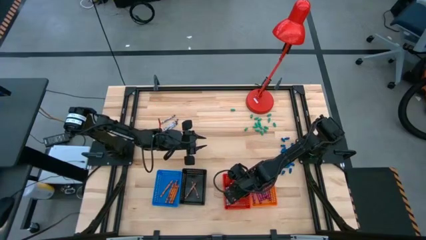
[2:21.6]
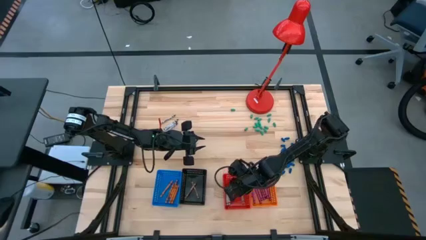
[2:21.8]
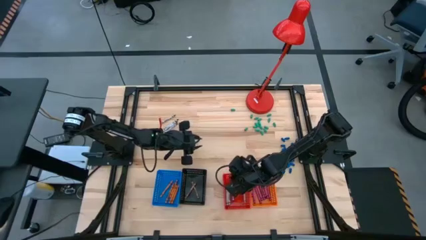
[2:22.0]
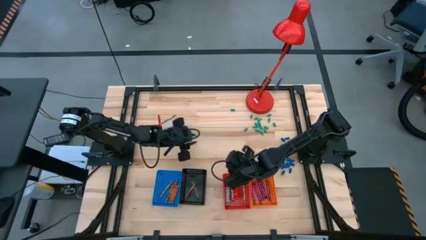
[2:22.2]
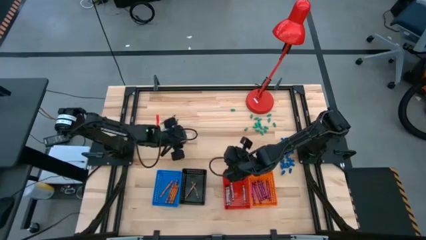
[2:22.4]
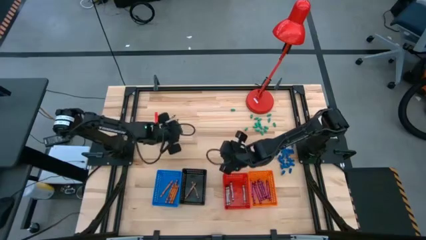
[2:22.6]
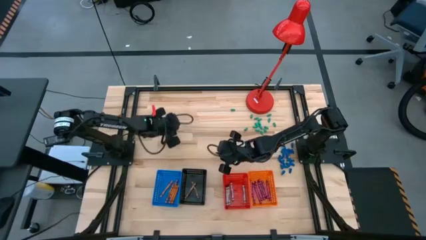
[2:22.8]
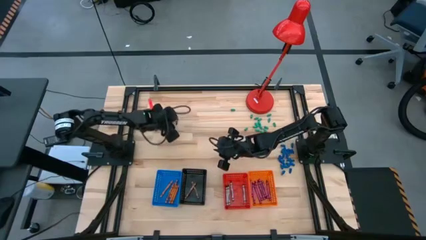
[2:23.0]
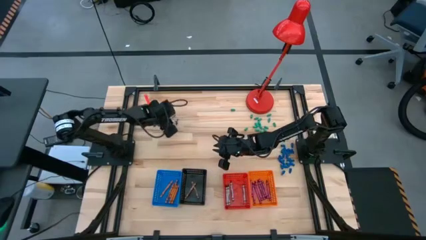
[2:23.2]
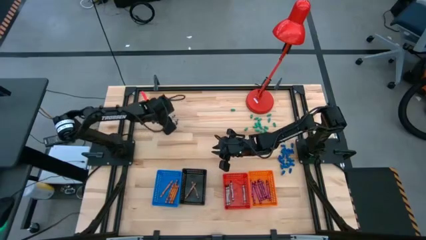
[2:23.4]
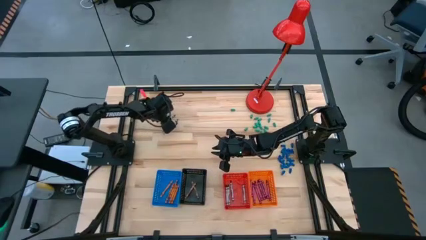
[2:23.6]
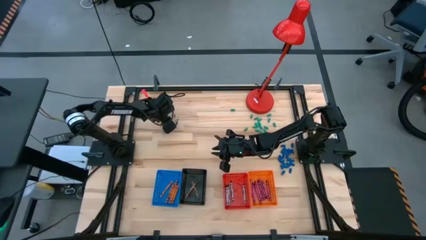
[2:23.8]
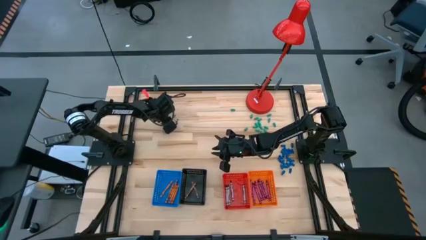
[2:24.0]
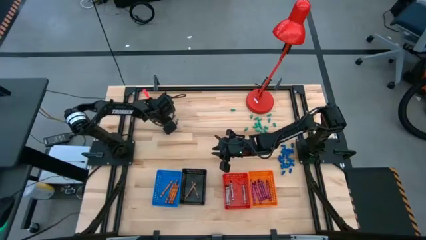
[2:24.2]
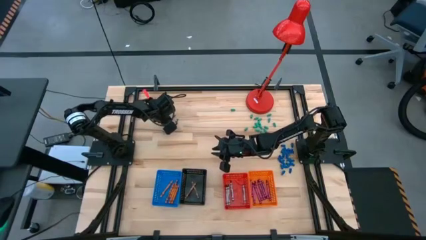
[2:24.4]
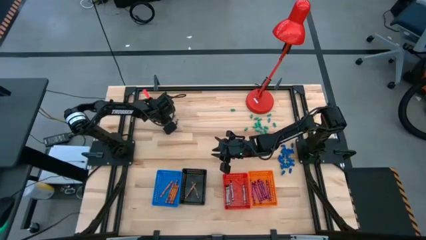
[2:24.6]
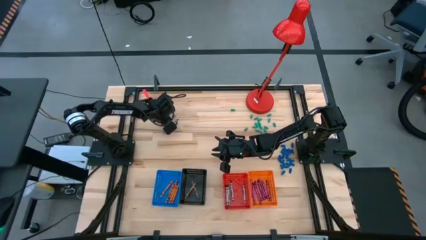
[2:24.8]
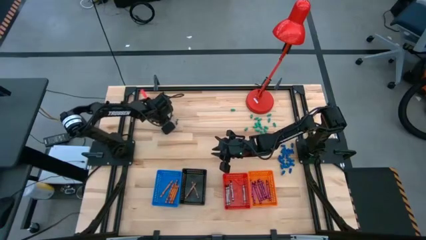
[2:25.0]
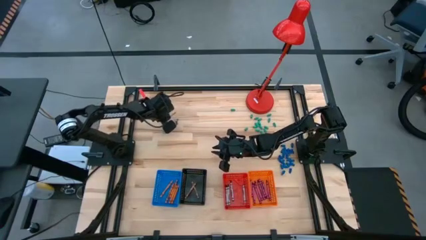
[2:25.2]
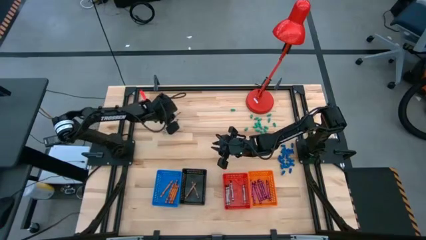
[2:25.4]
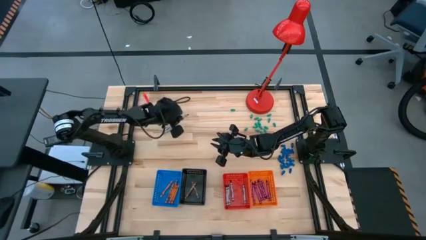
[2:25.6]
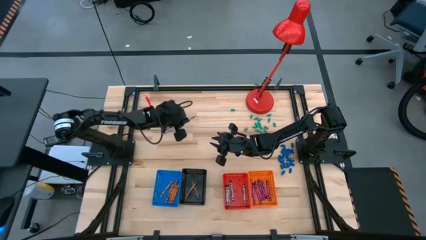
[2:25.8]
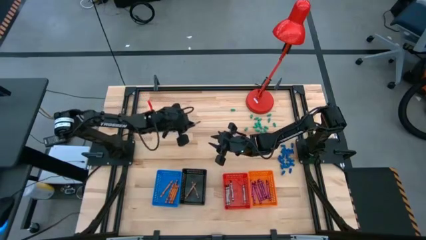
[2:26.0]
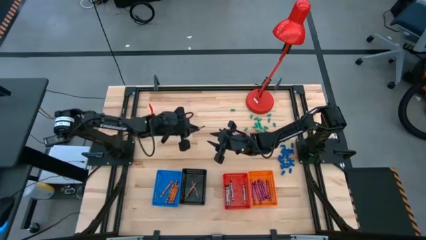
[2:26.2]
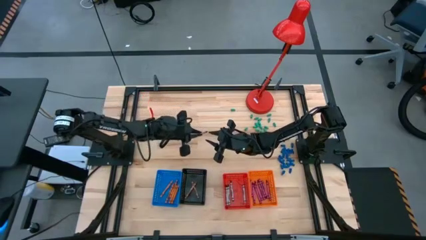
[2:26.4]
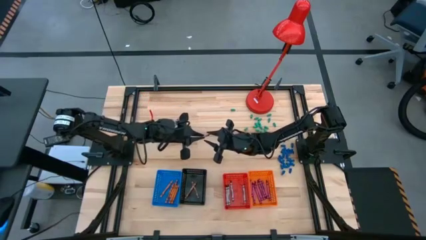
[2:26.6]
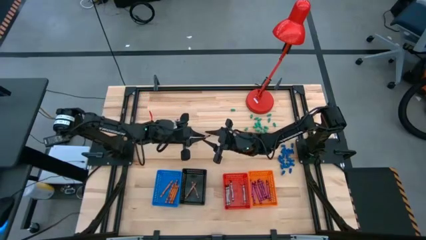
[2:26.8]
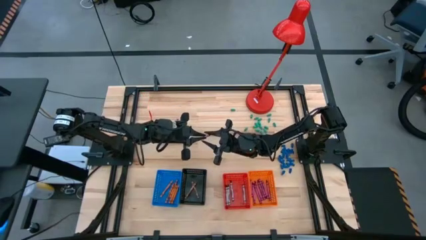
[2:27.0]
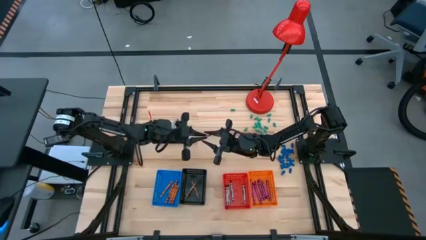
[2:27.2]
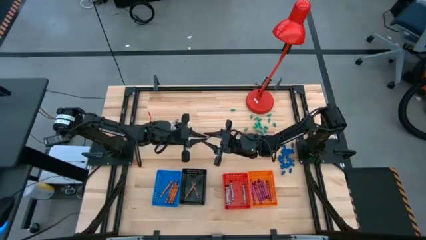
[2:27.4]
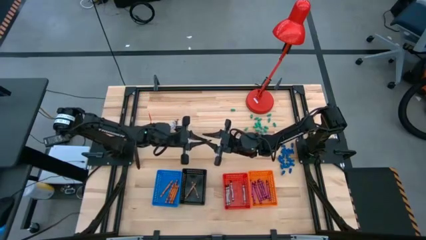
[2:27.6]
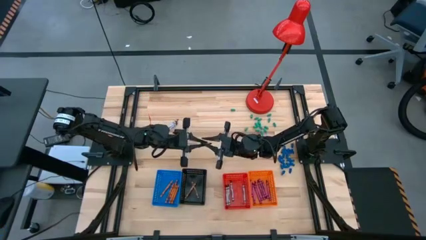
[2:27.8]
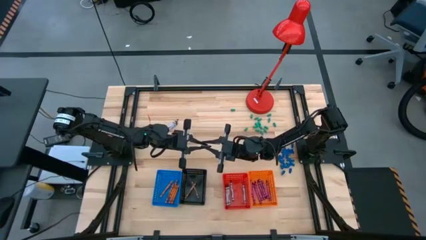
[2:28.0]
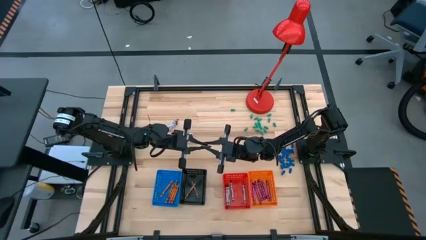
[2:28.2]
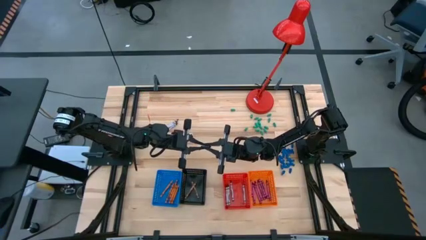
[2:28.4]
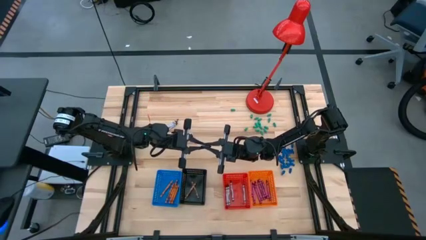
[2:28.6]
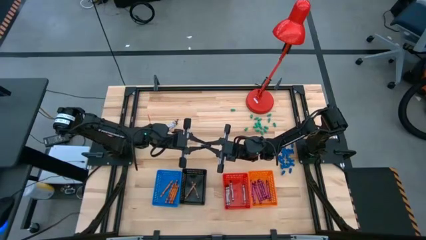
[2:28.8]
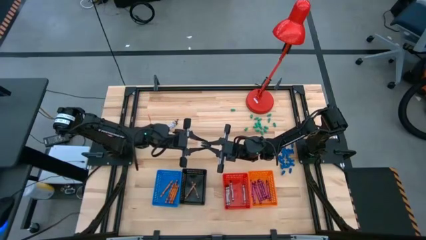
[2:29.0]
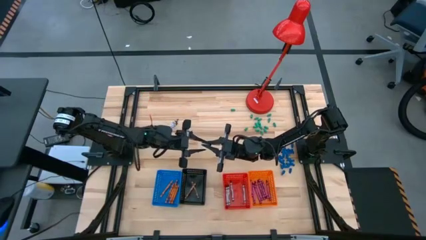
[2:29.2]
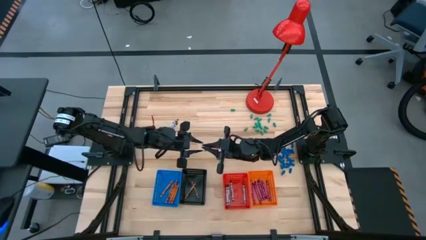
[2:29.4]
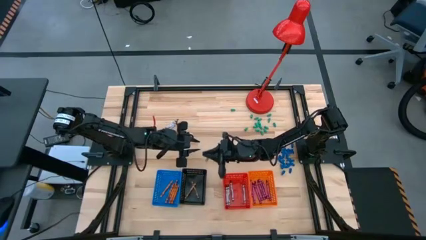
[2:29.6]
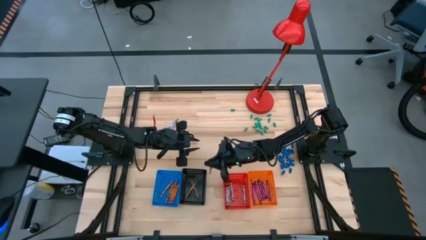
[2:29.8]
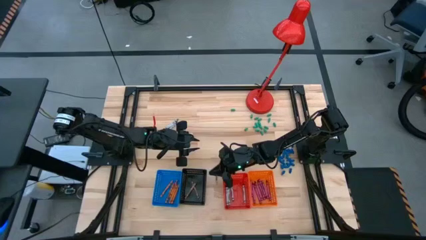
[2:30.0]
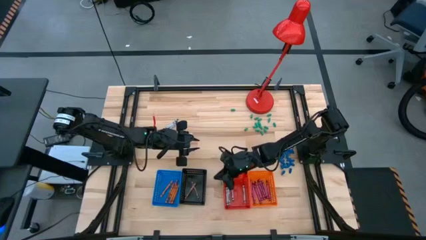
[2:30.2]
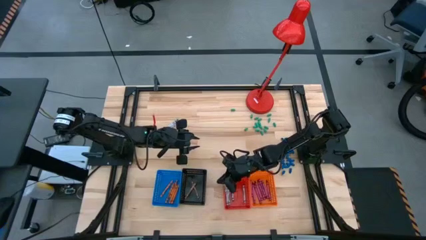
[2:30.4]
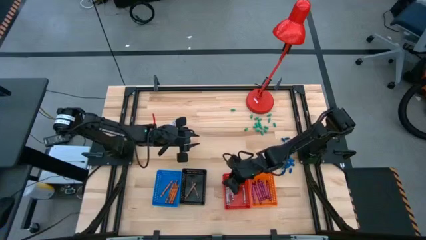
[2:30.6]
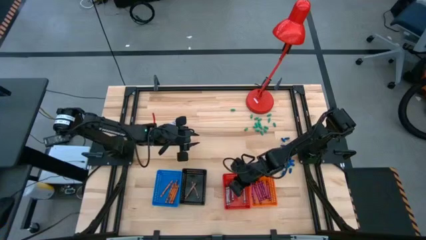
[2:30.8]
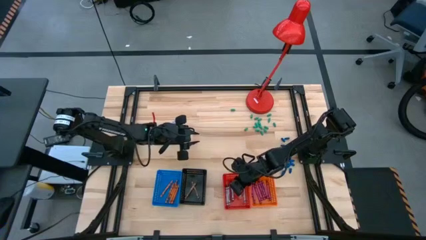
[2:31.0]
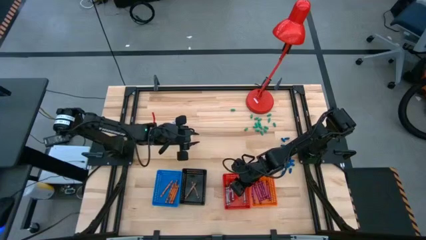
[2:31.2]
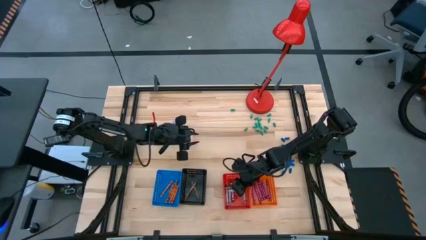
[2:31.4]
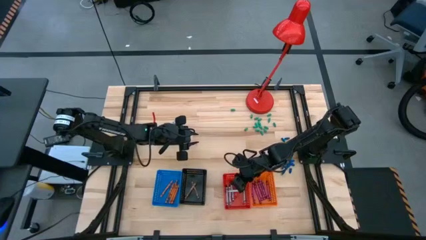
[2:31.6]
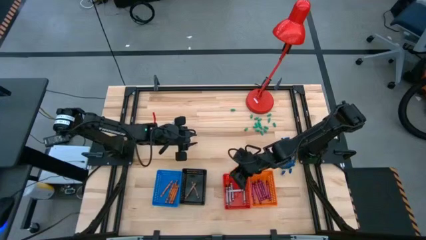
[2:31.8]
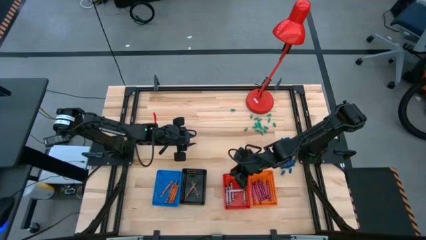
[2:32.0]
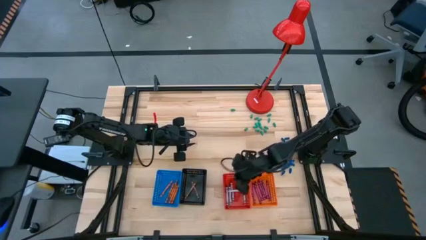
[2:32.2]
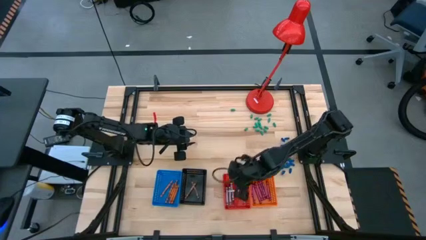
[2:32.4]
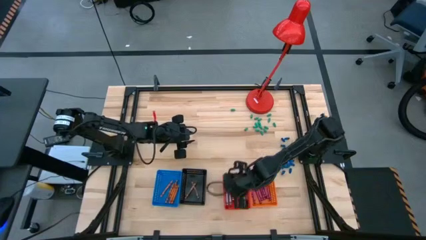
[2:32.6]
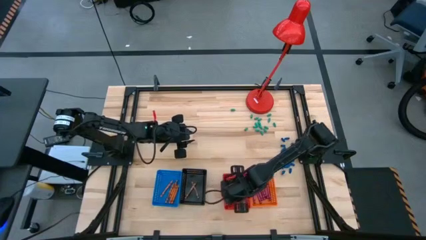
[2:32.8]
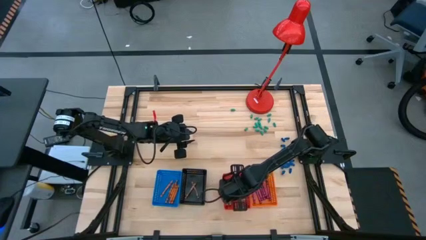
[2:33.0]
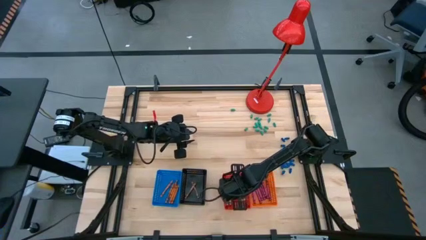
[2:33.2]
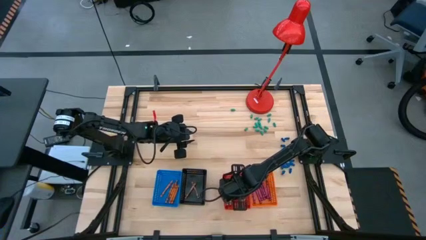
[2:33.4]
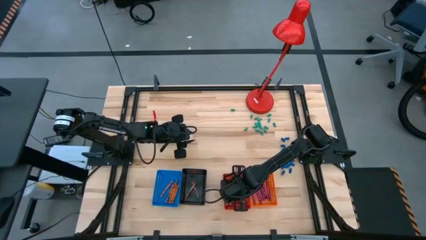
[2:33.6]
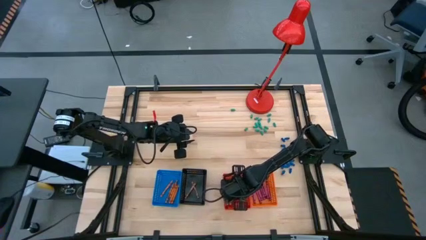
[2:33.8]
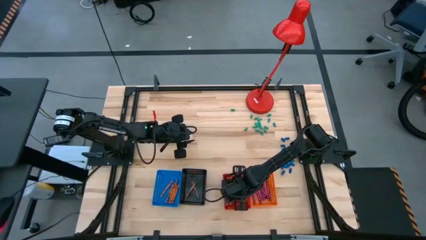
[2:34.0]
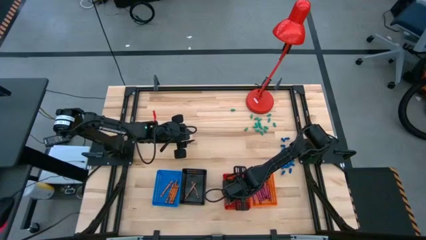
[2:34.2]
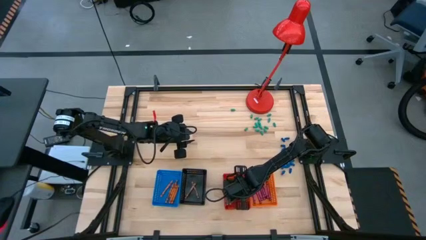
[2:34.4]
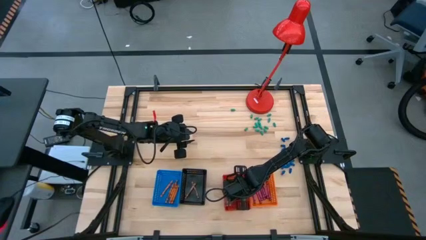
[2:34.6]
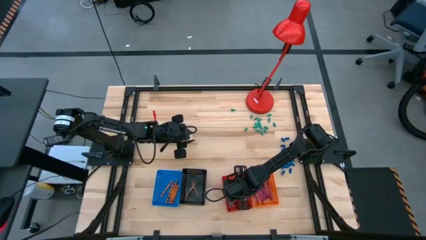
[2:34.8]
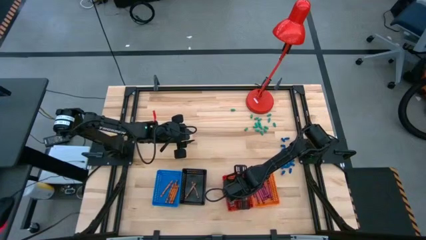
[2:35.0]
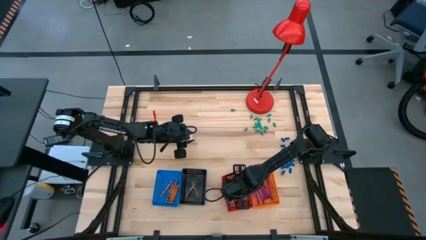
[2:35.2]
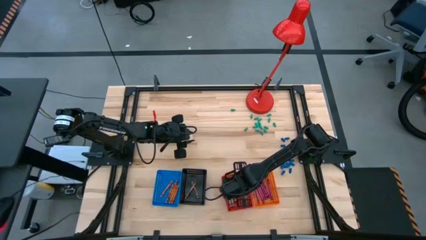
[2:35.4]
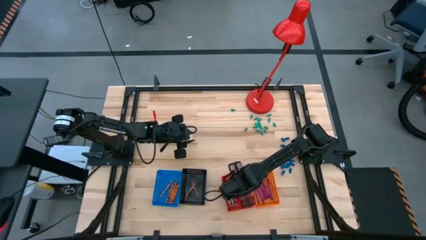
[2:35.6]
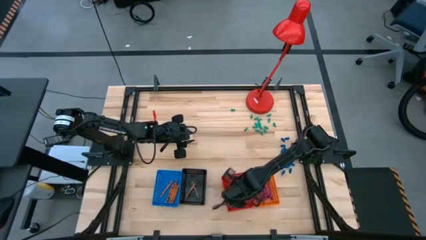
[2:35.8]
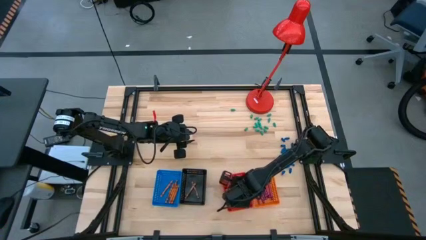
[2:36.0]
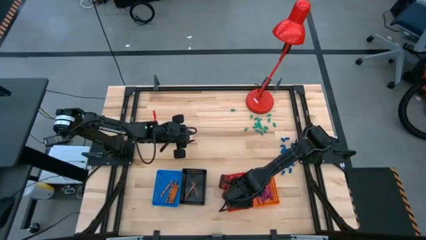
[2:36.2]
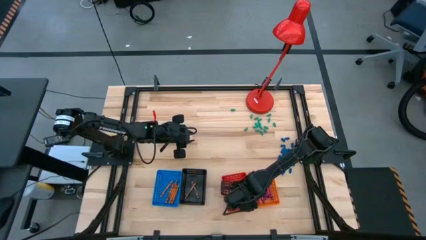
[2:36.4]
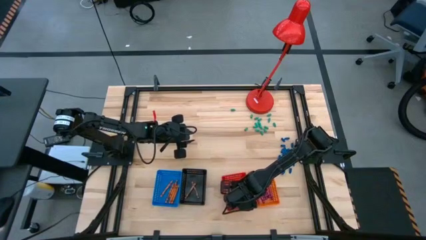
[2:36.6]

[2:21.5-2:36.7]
Task: Sort crayons
Put the black crayon into the red basket
